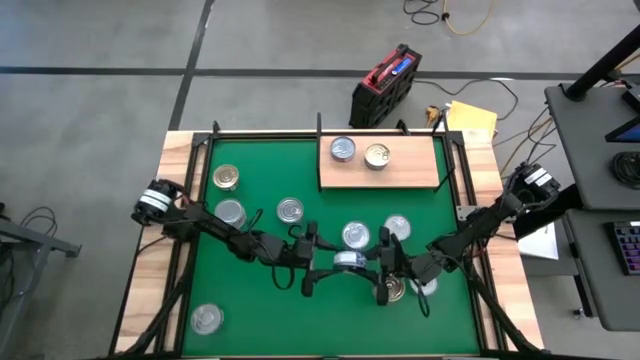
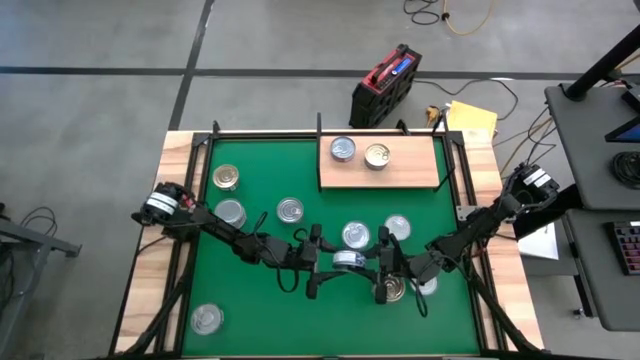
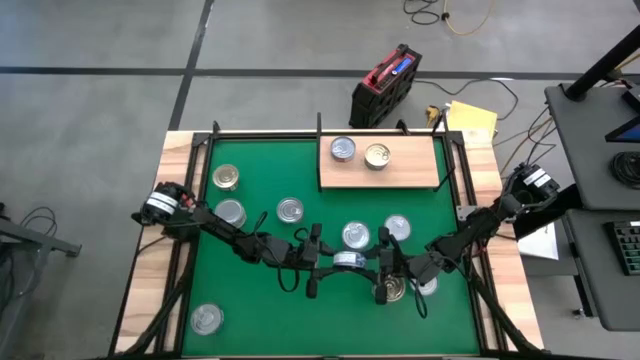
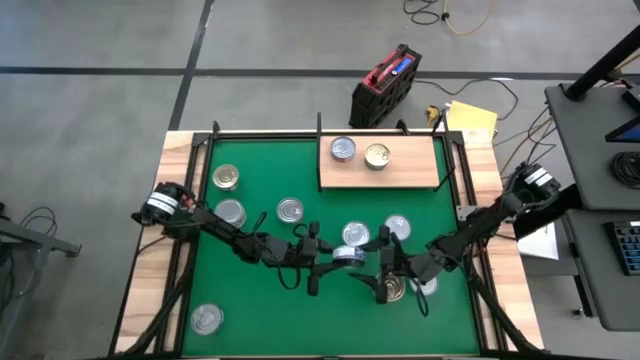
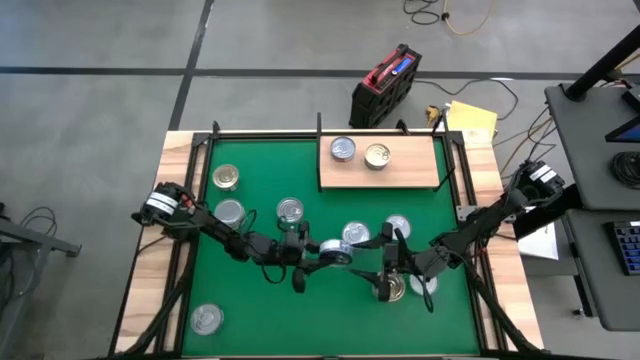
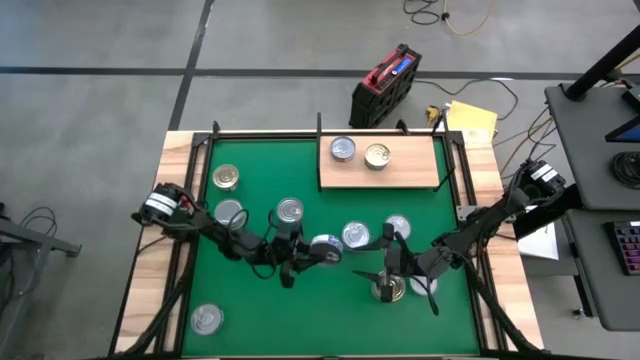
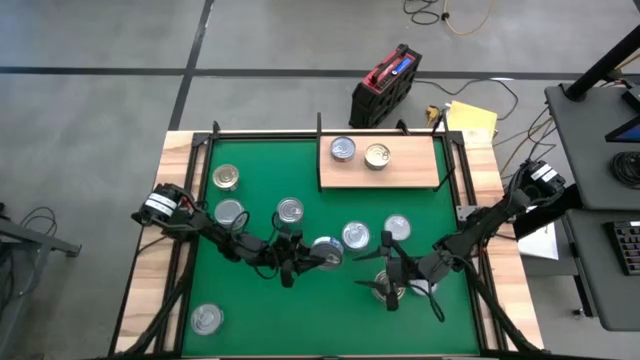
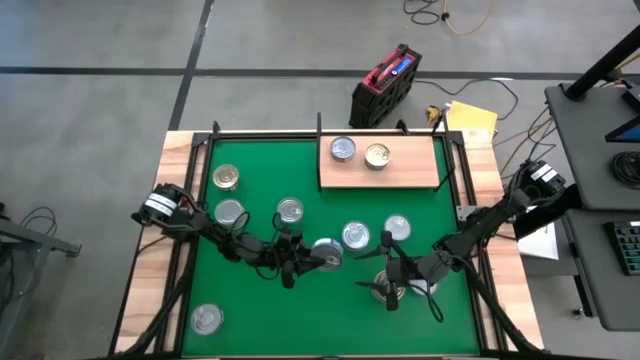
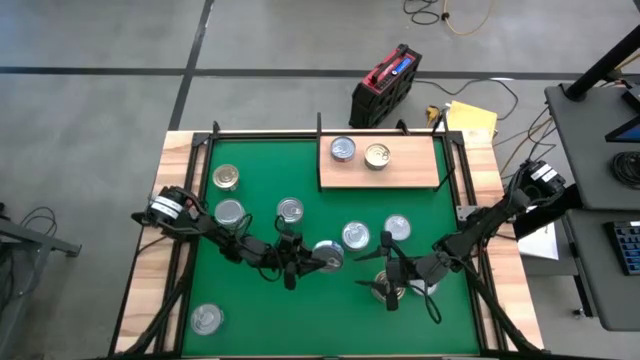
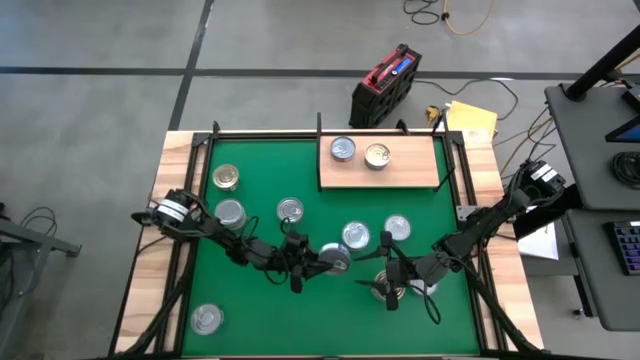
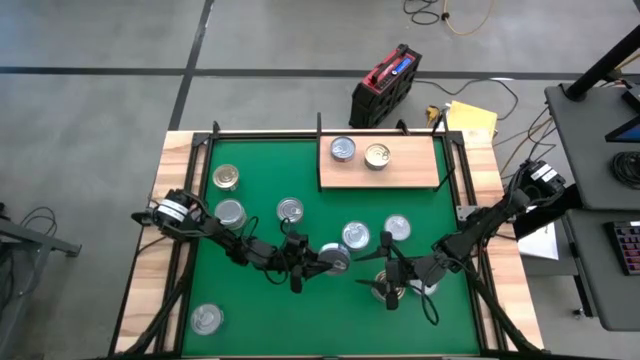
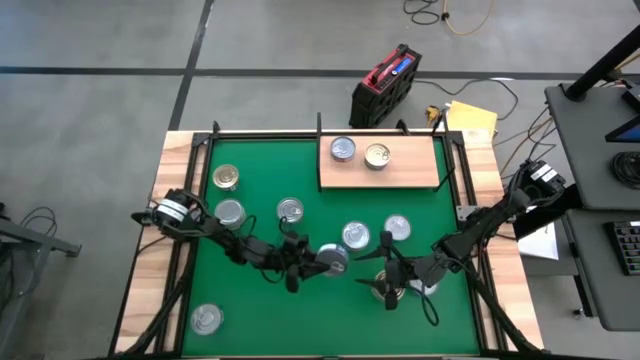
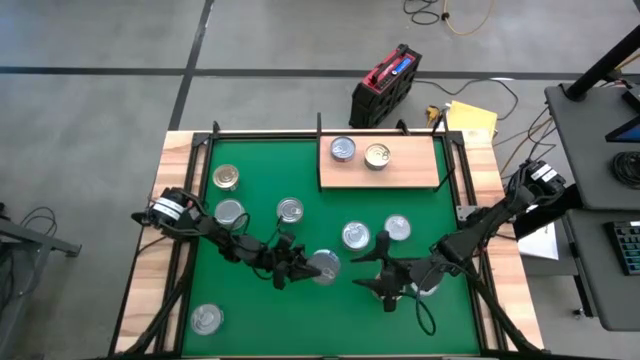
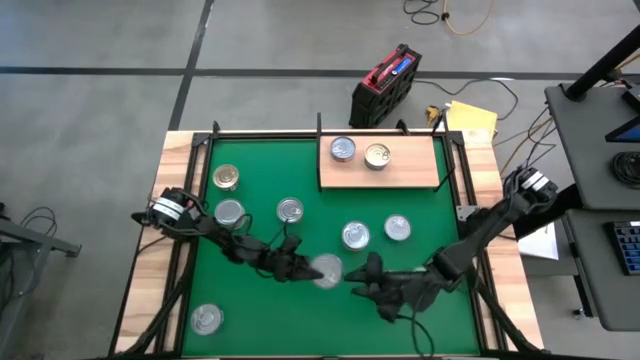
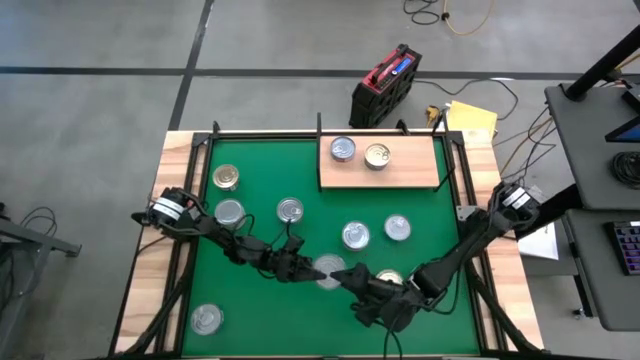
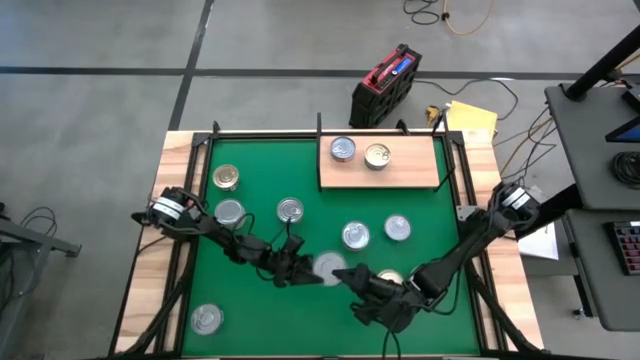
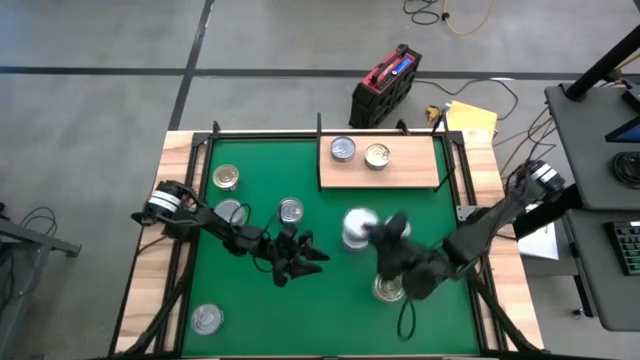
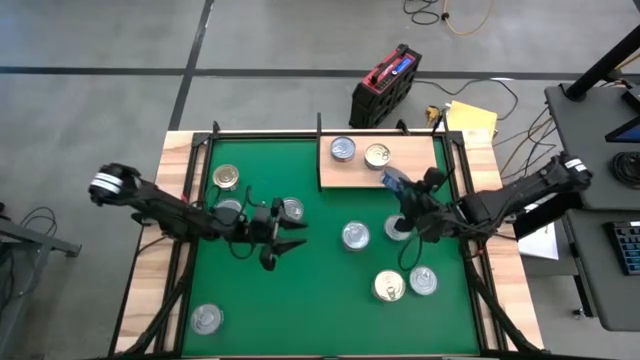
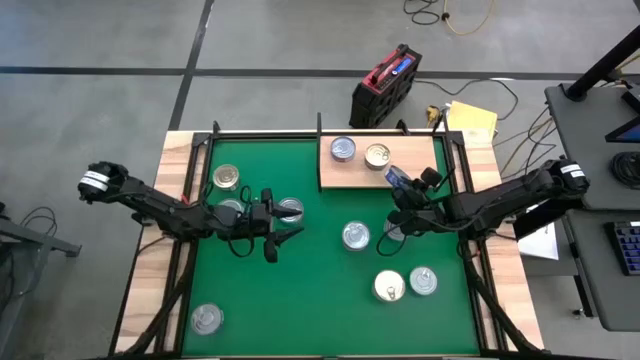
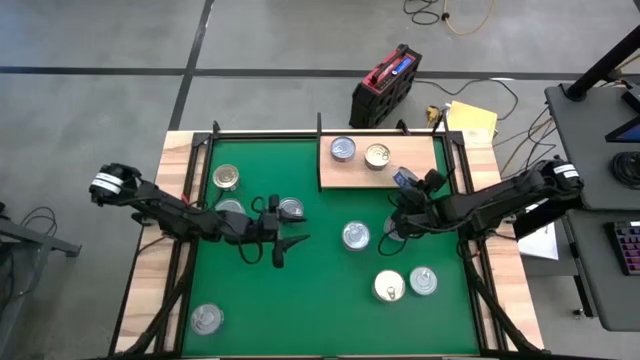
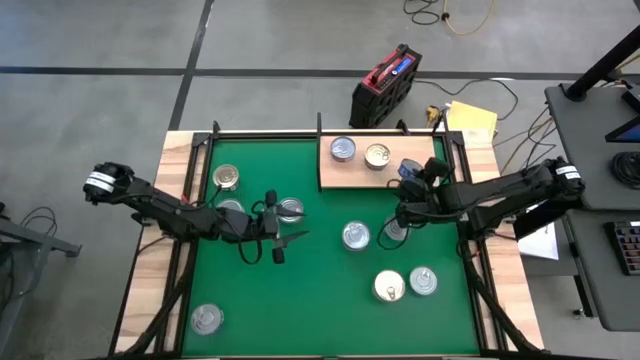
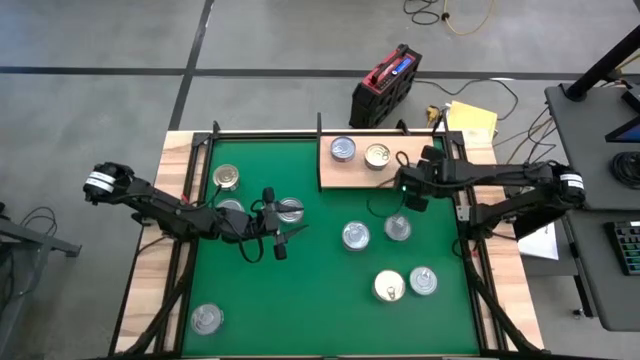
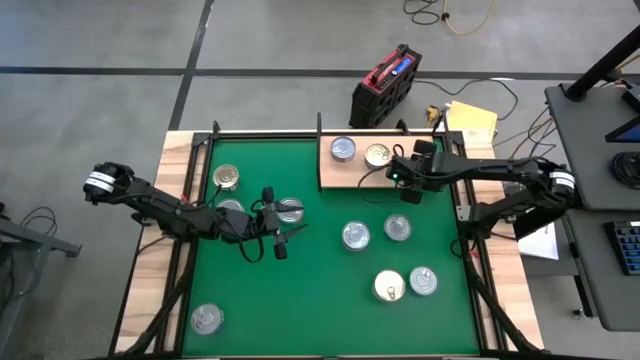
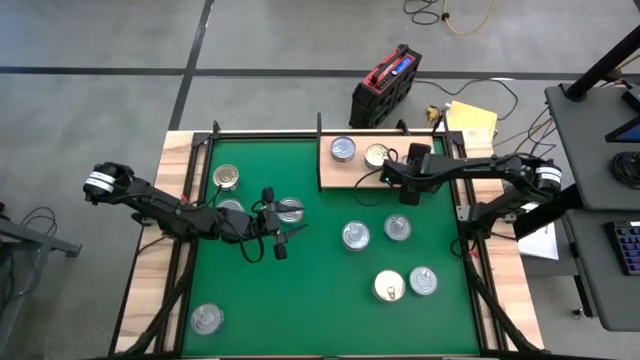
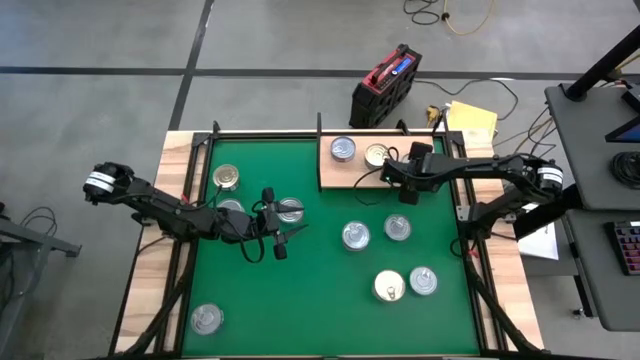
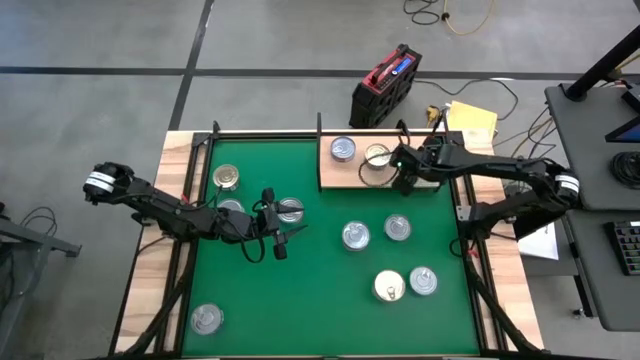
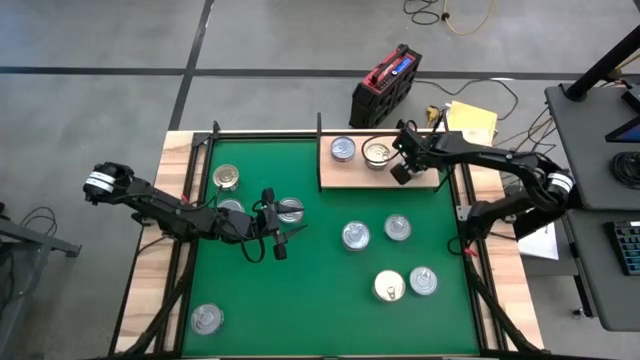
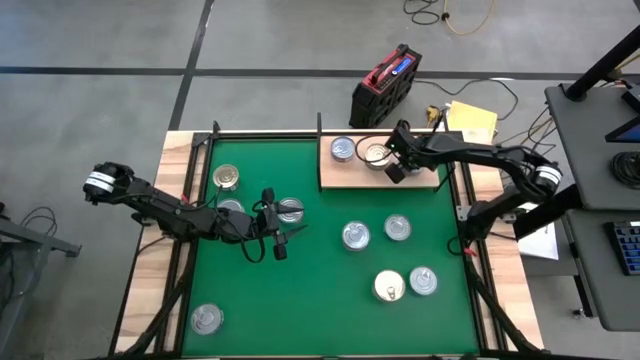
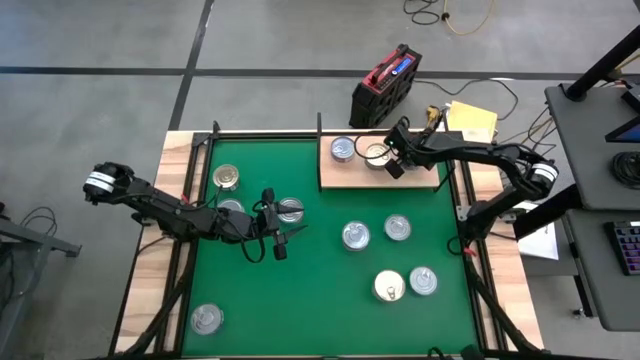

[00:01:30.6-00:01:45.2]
Task: Stack canned seafood by type on shelf
Put the blue tuna can on the shelf

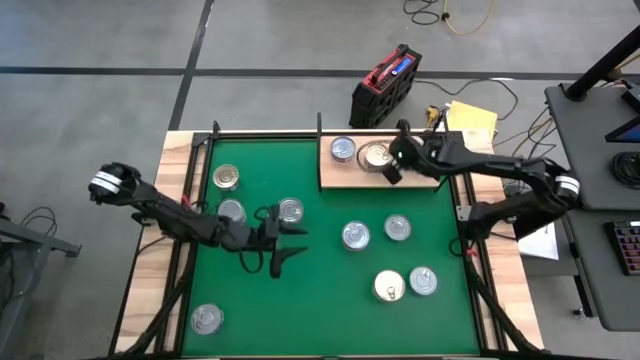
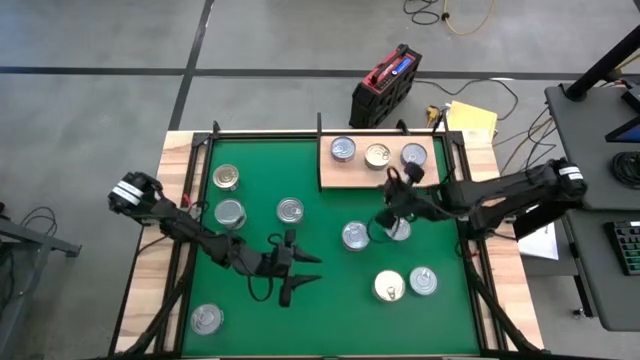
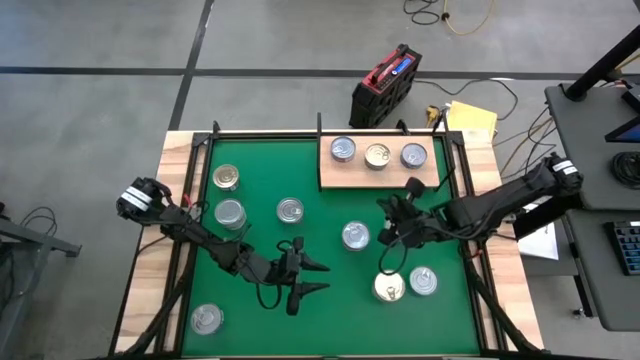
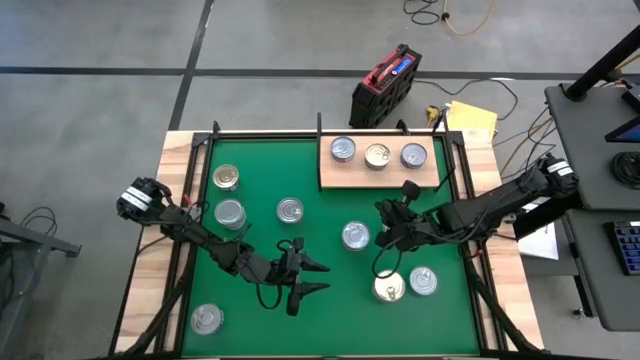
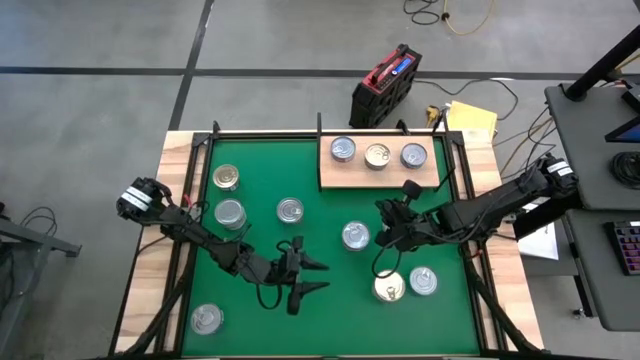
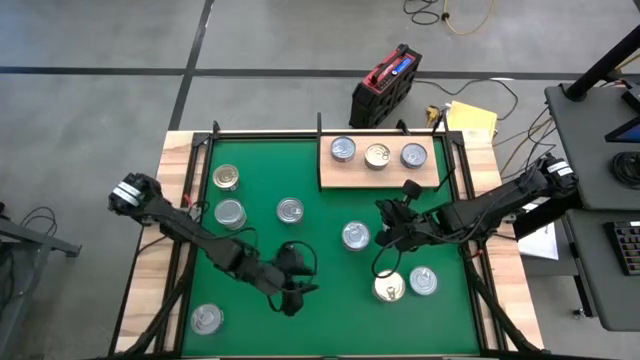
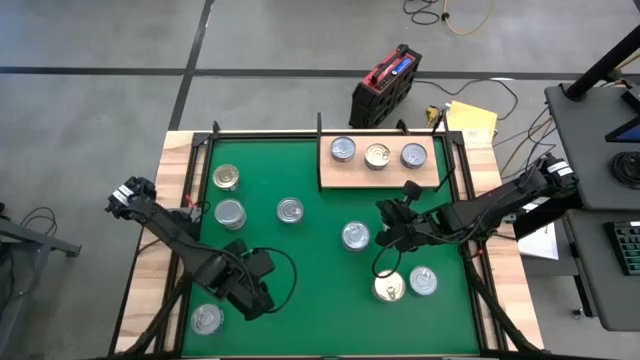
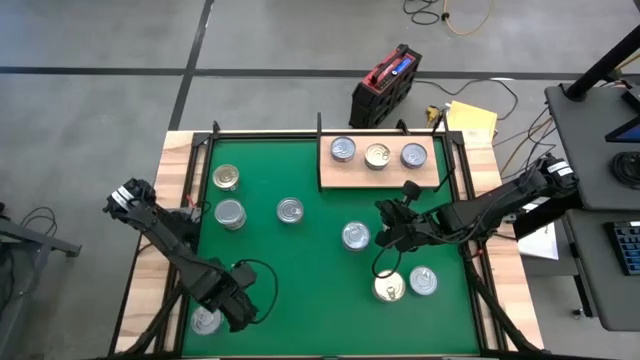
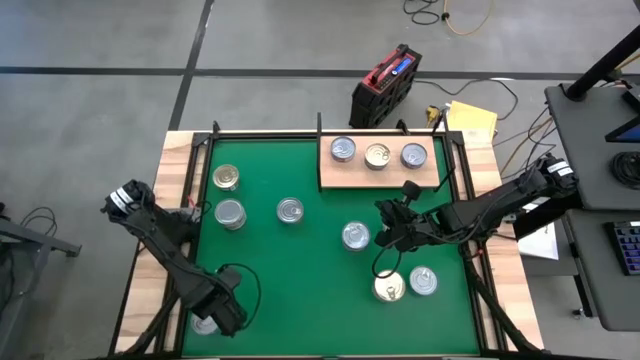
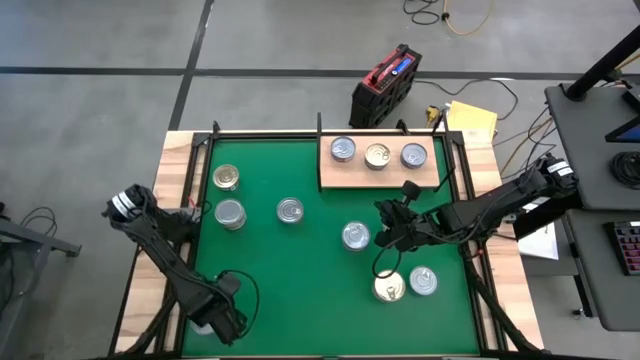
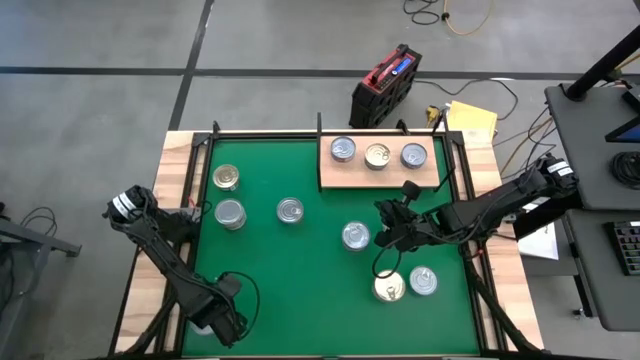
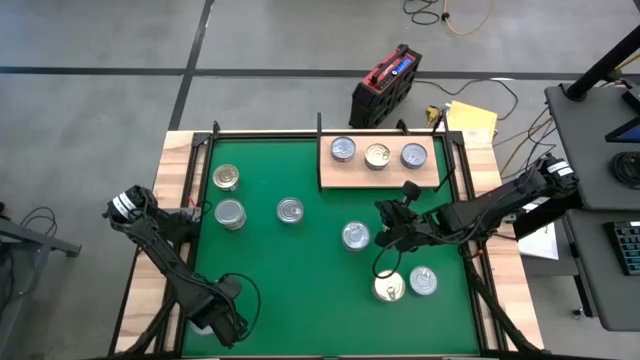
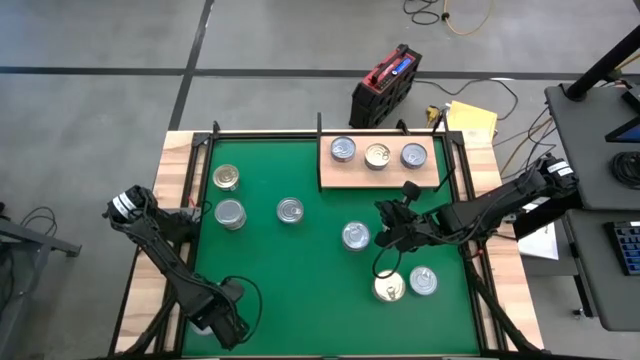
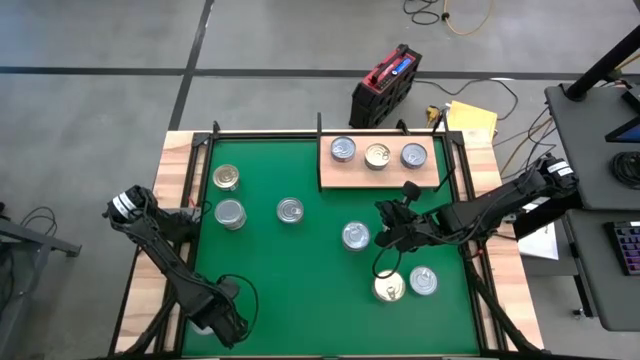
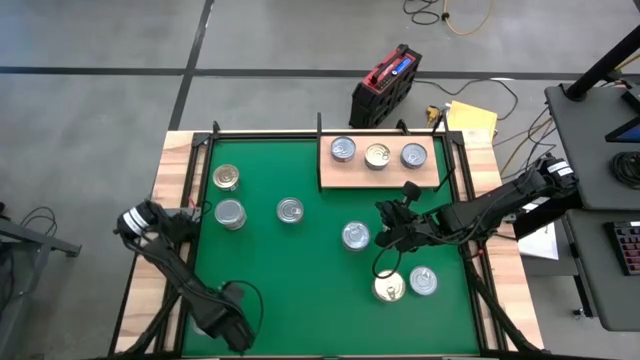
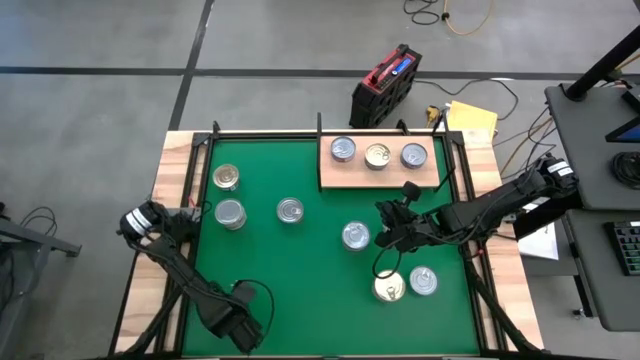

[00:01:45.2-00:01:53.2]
Adjust the blue tuna can on the table
